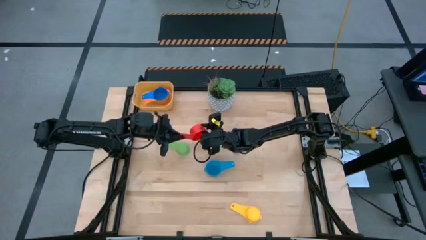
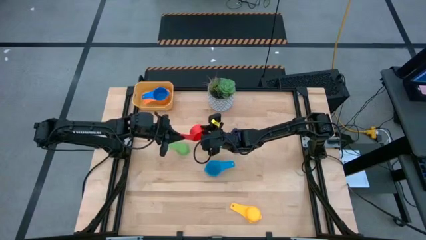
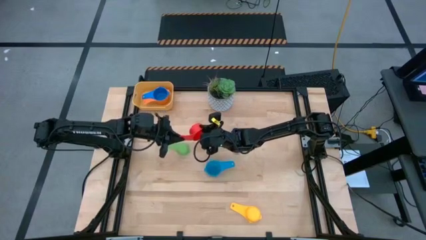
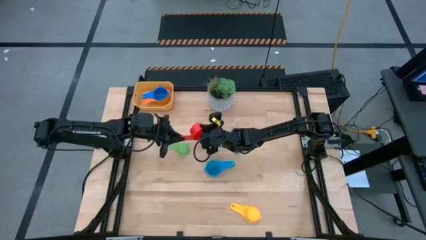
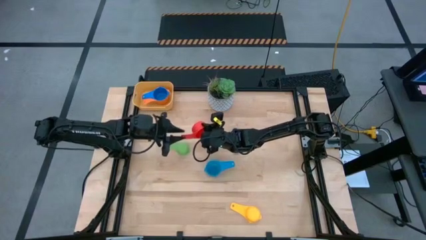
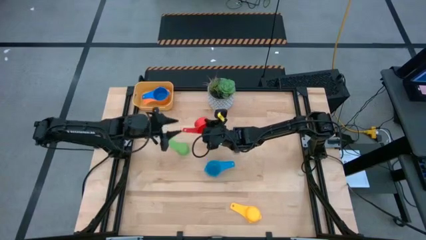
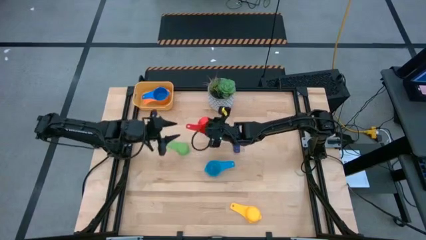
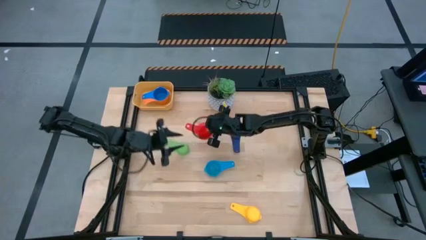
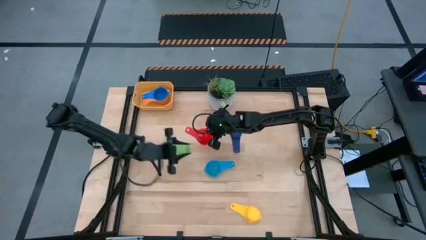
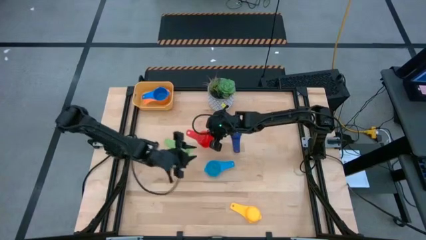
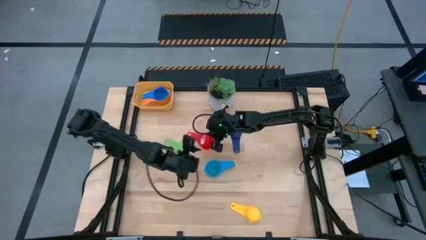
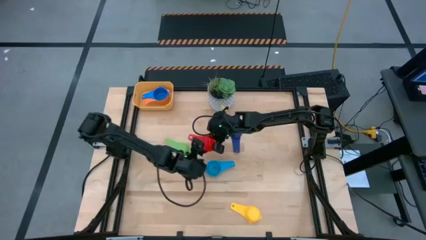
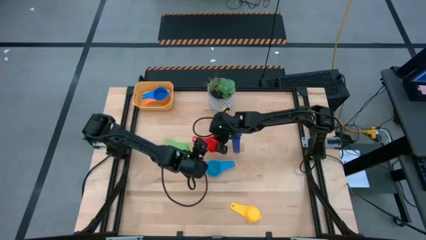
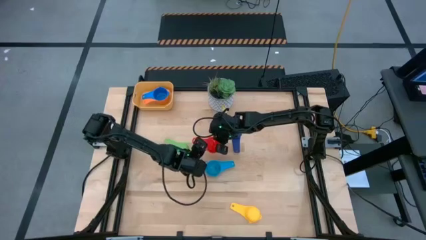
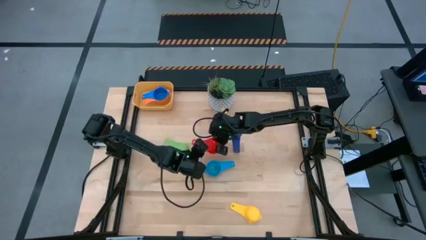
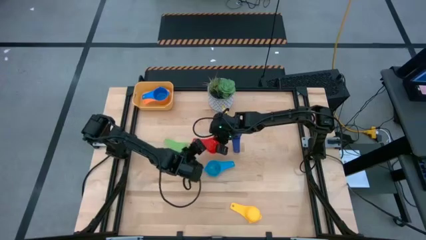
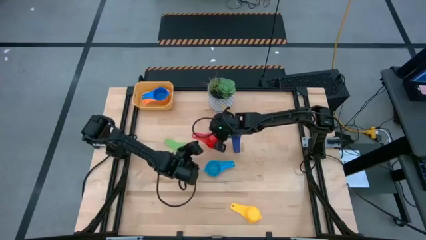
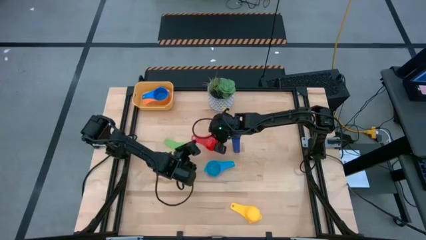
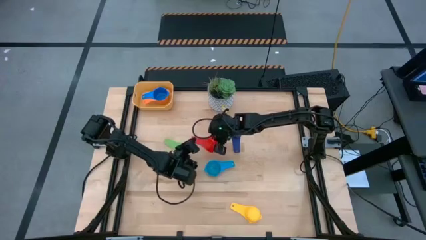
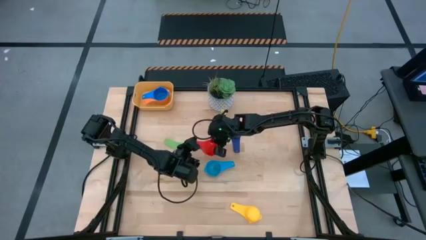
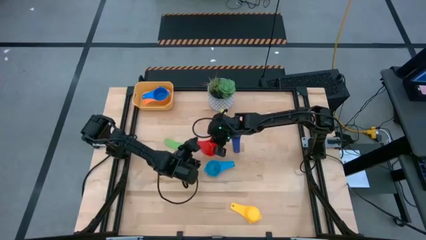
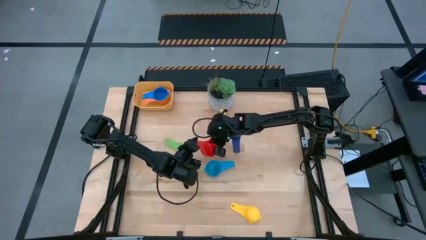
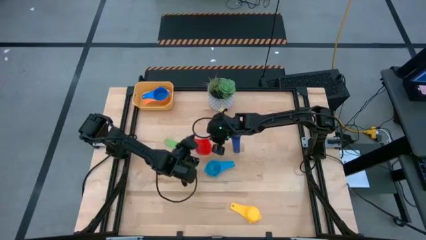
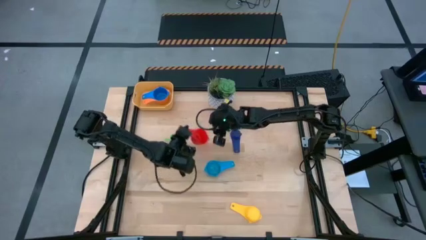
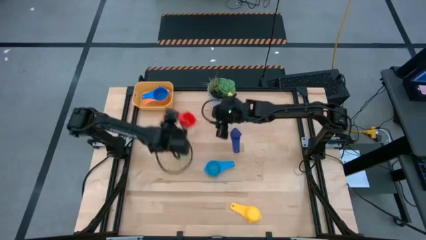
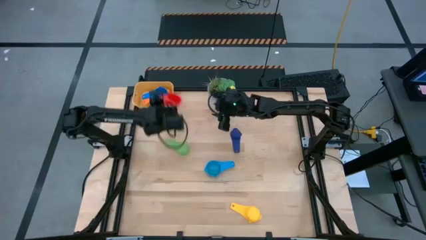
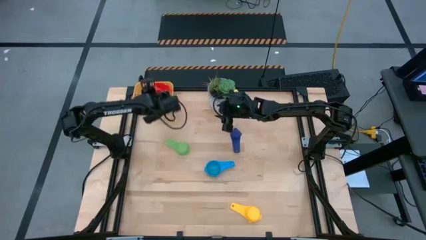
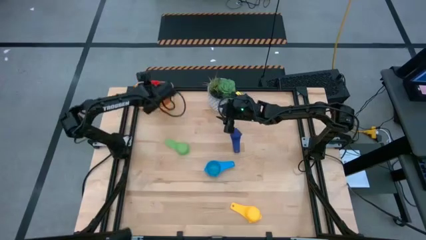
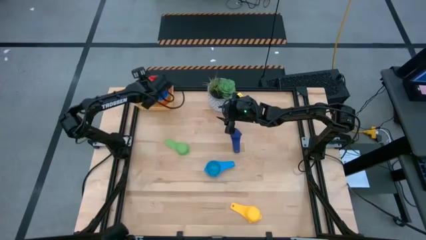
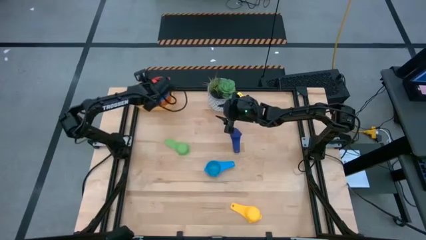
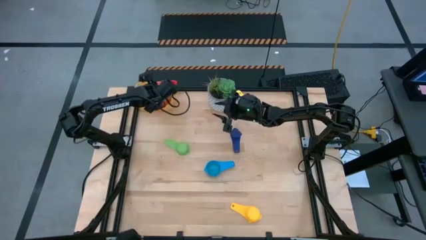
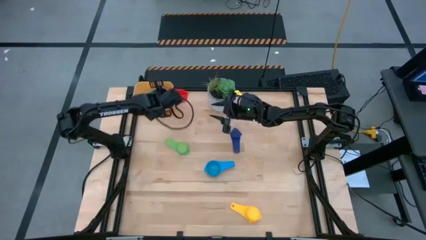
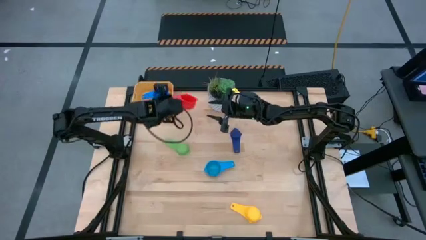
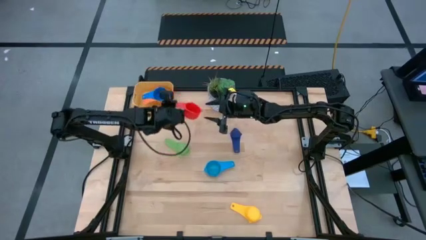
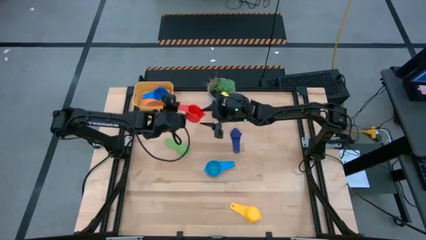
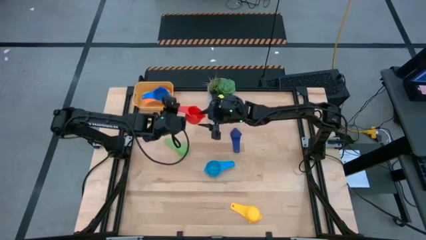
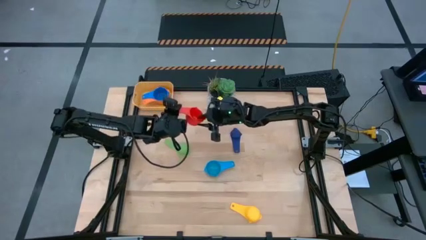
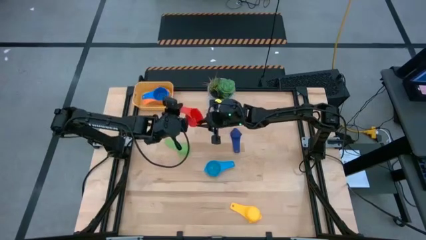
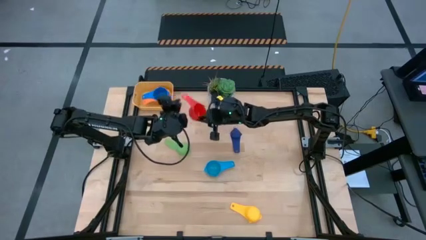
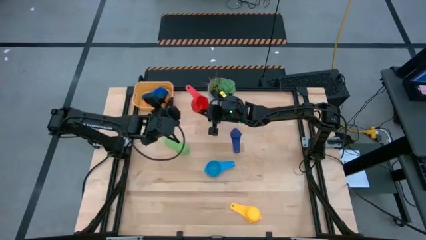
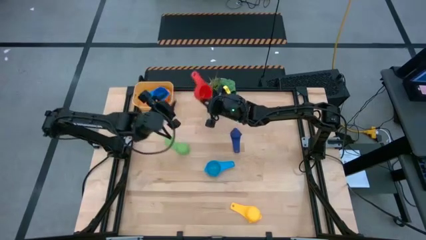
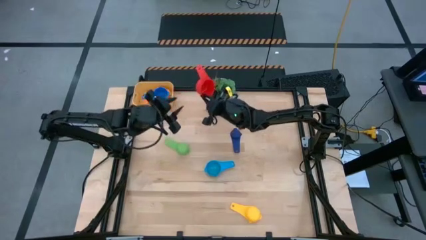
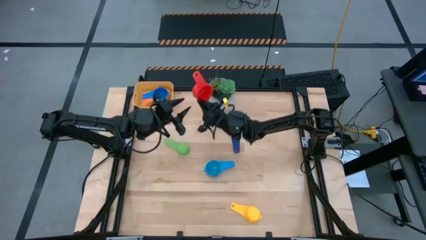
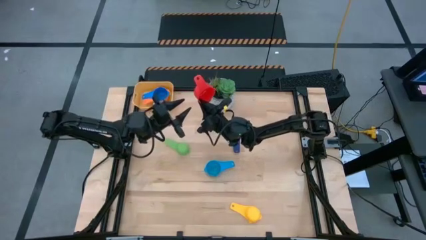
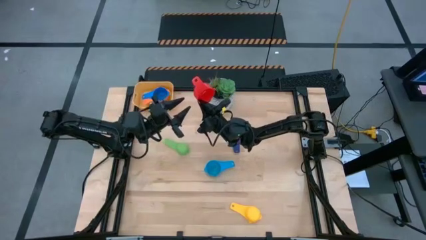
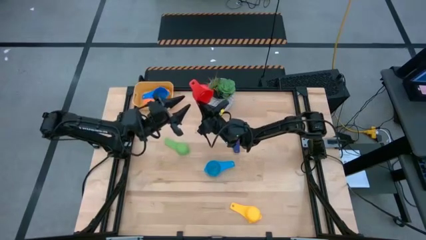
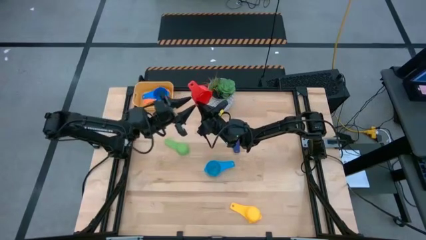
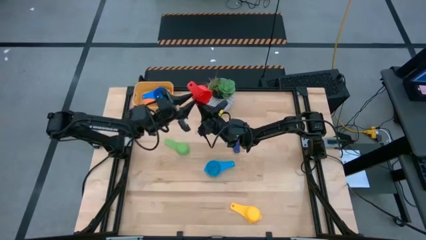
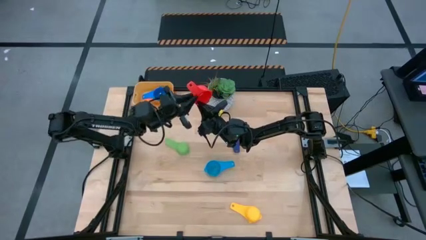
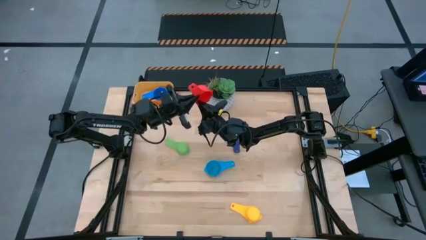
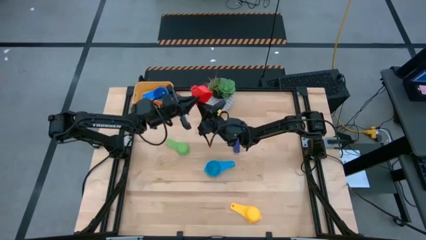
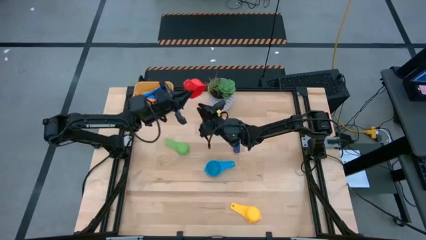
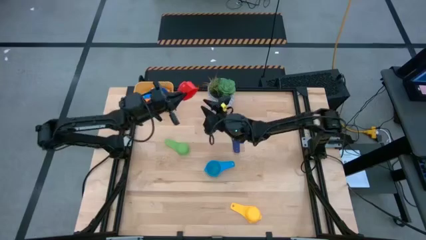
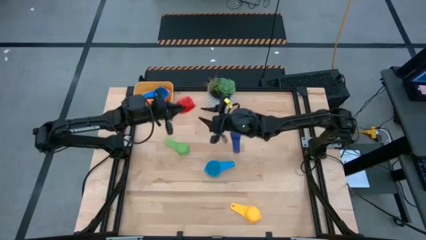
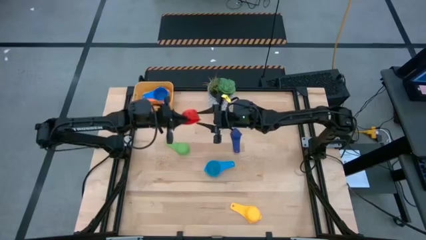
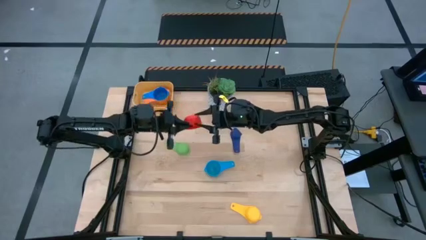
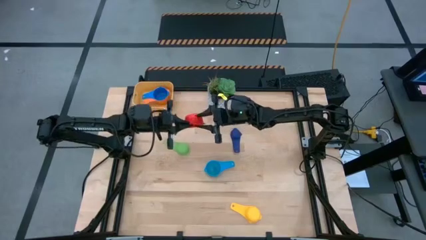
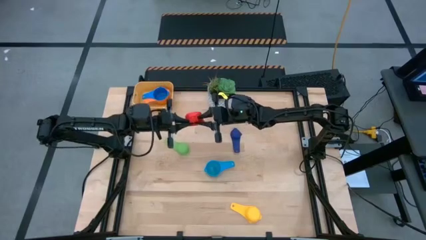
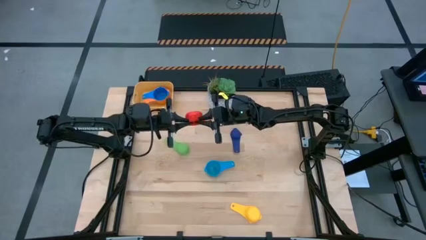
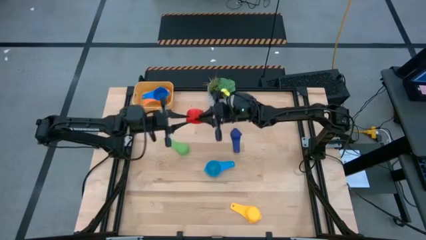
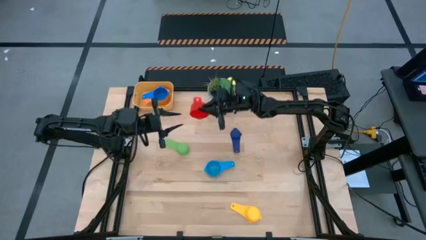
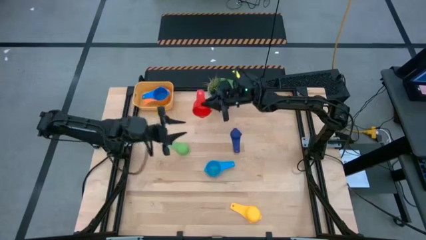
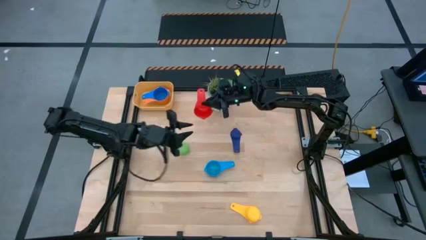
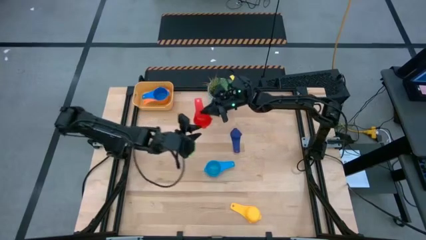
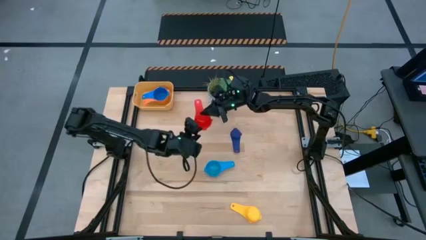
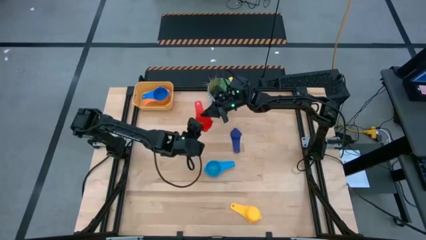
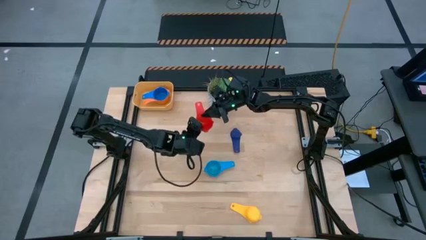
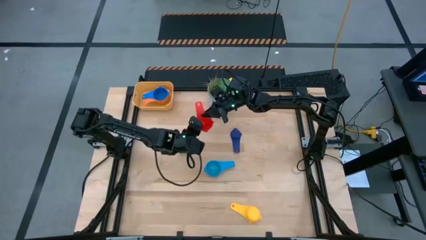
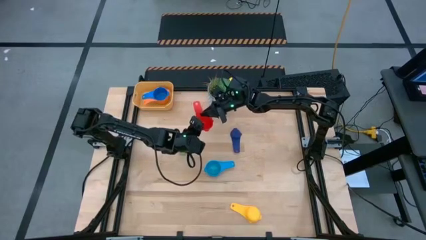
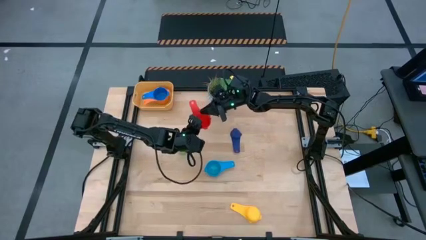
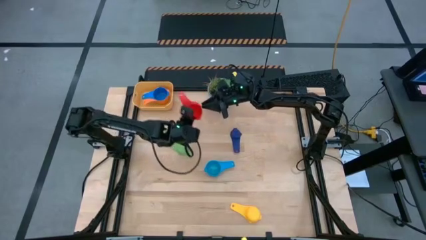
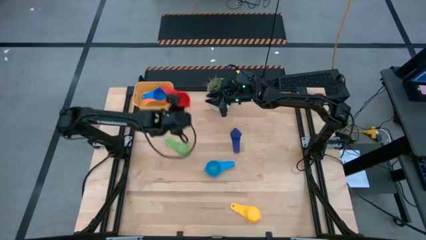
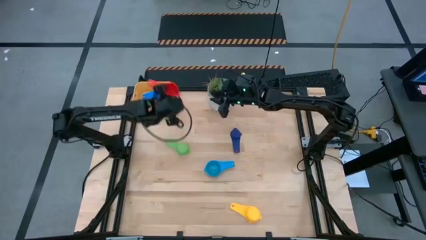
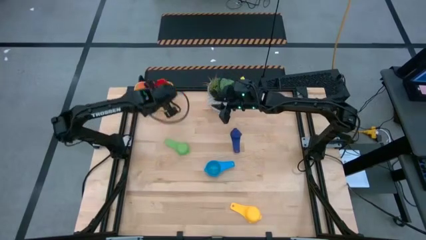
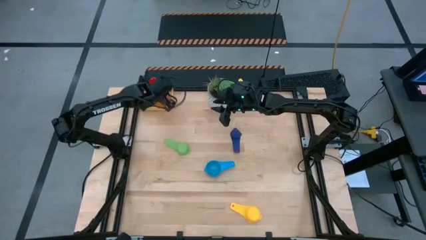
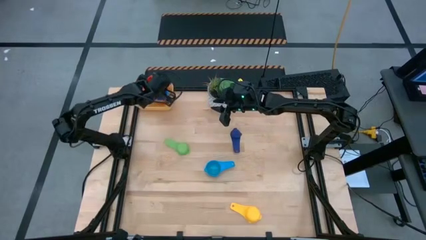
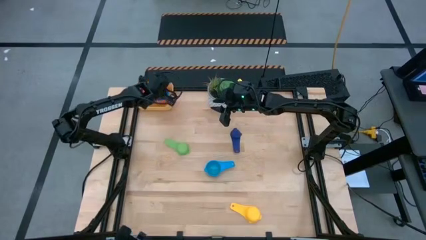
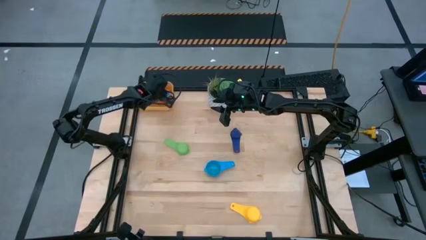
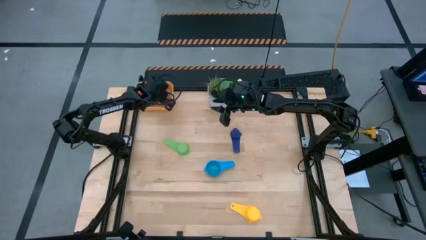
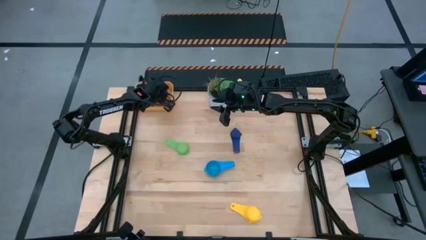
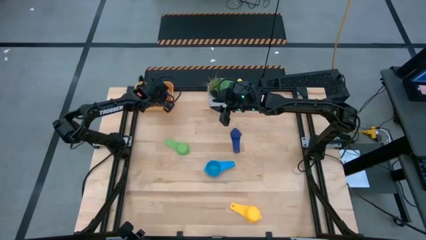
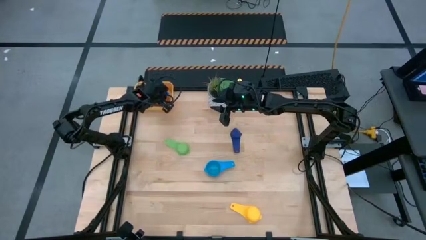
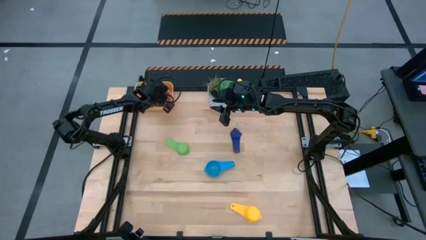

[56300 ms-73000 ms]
Task: Nest measuring cups in basket
Stack the dark orange measuring cup on top of the dark blue measuring cup in the yellow bin
